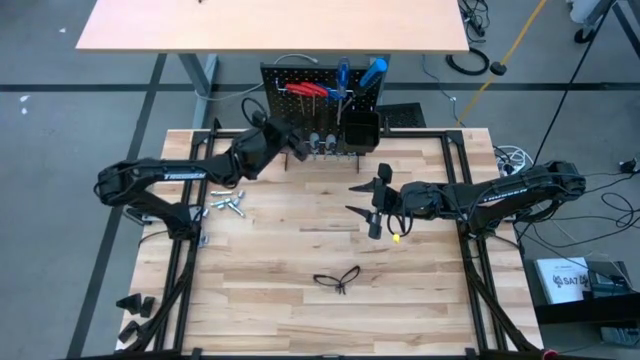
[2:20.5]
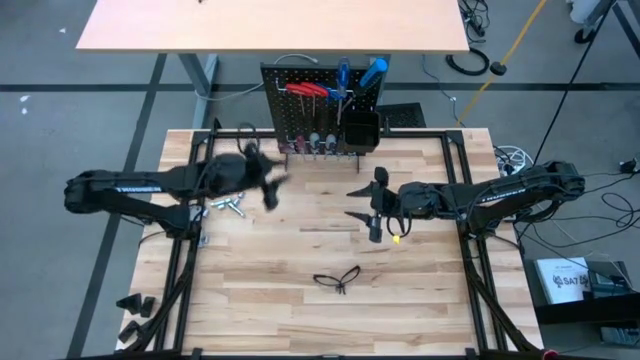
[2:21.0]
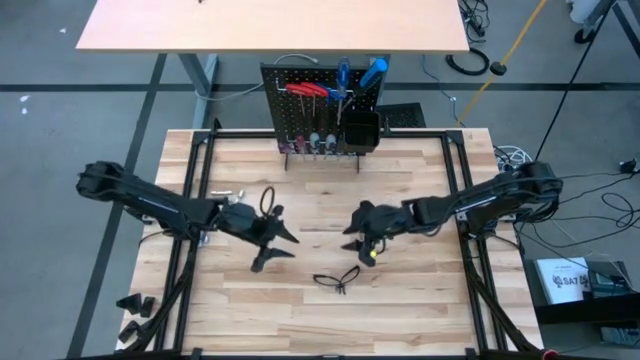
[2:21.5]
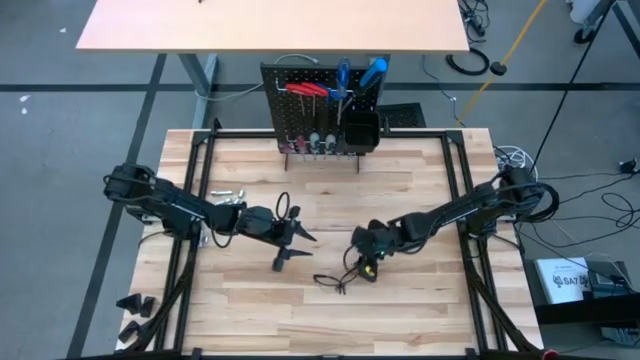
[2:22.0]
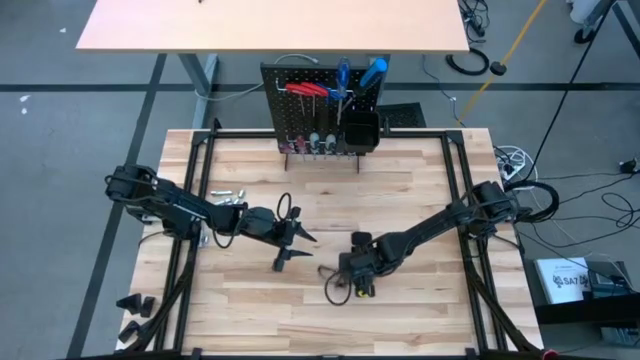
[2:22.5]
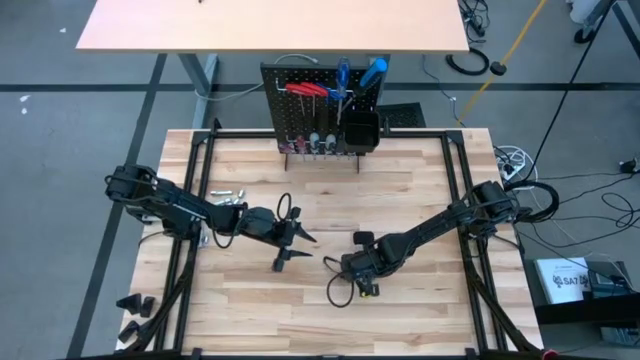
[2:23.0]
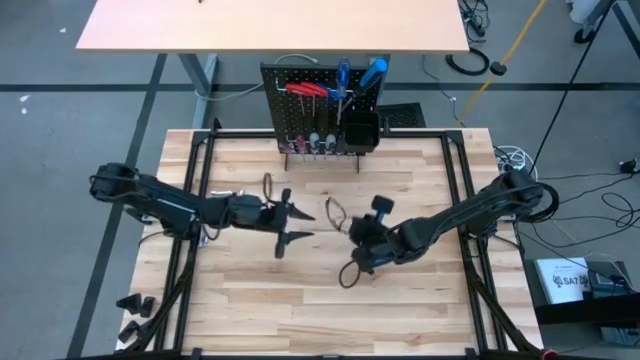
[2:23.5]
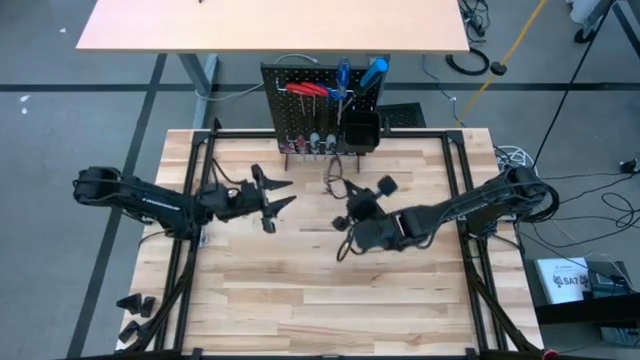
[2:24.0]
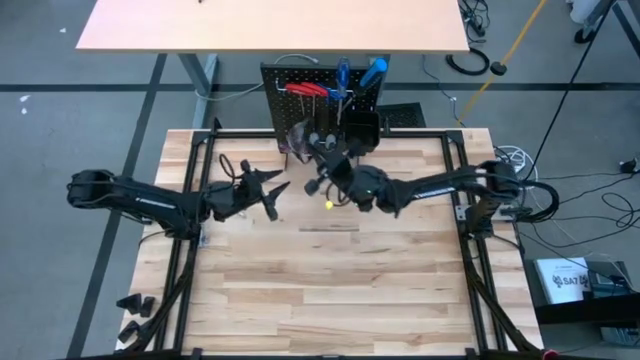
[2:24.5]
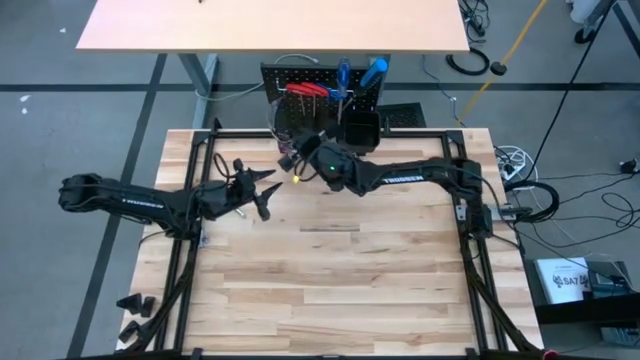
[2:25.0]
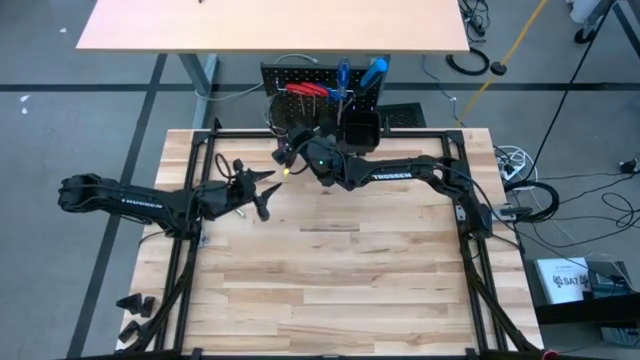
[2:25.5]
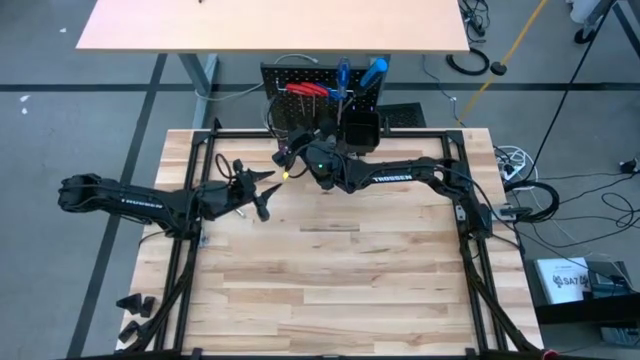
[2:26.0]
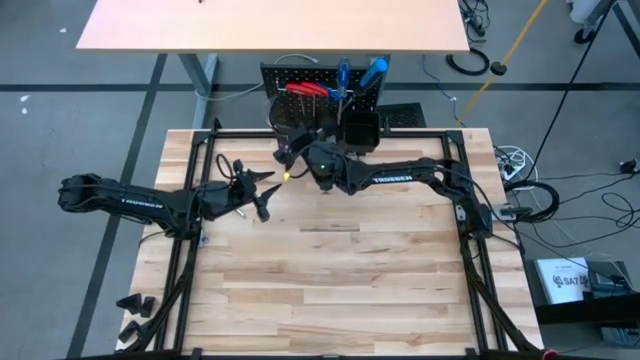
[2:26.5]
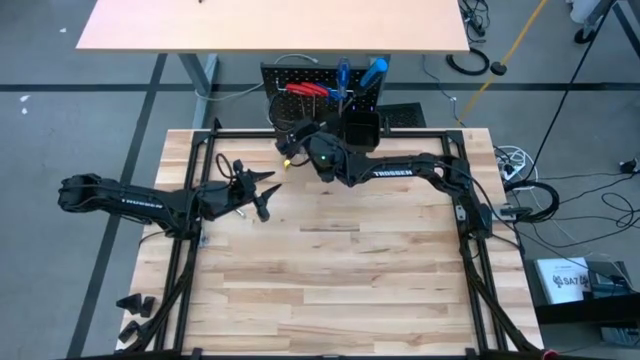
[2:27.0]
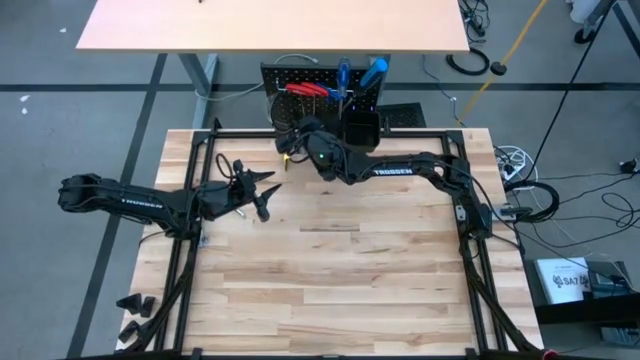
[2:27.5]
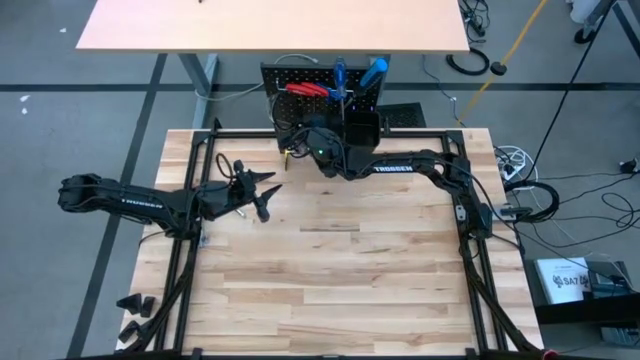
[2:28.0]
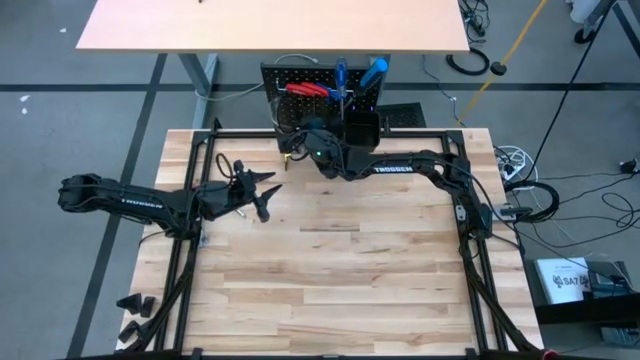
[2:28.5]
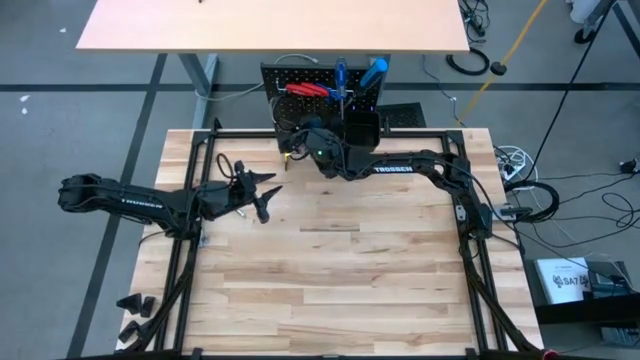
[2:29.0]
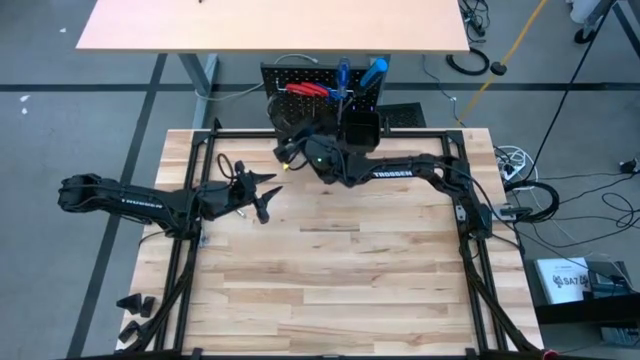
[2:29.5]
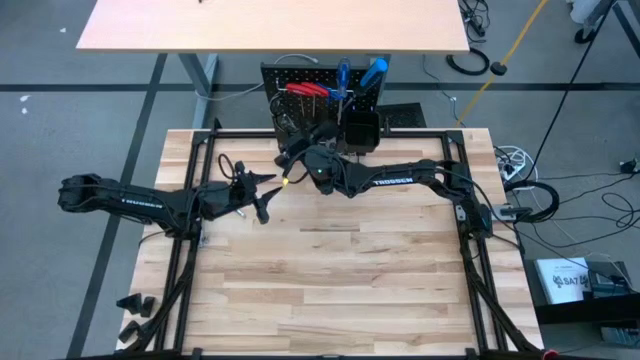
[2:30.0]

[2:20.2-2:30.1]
Task: Hang tools onto peg board
Hang the safety glasses onto the peg board

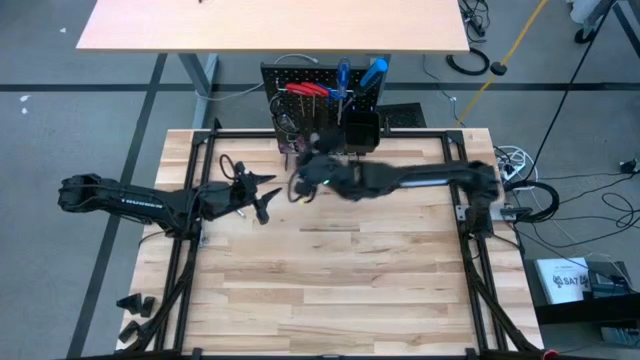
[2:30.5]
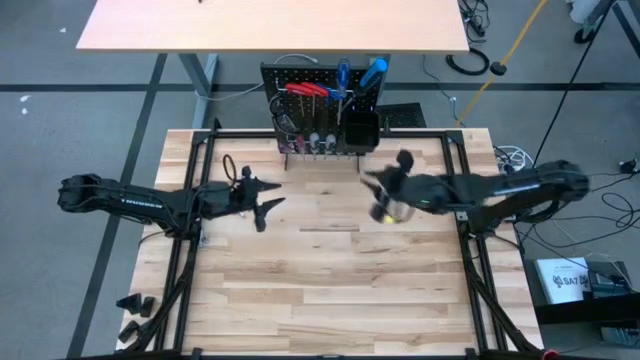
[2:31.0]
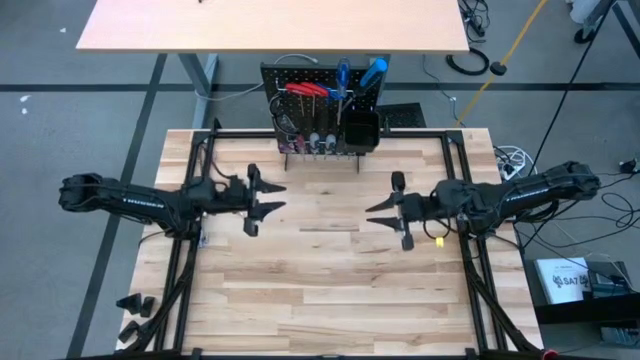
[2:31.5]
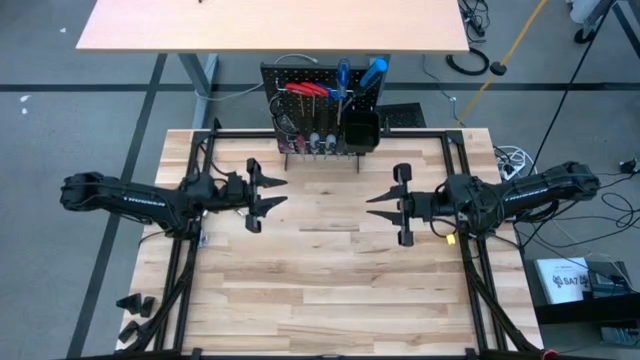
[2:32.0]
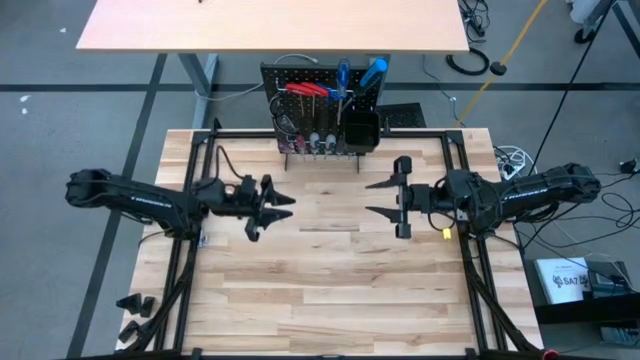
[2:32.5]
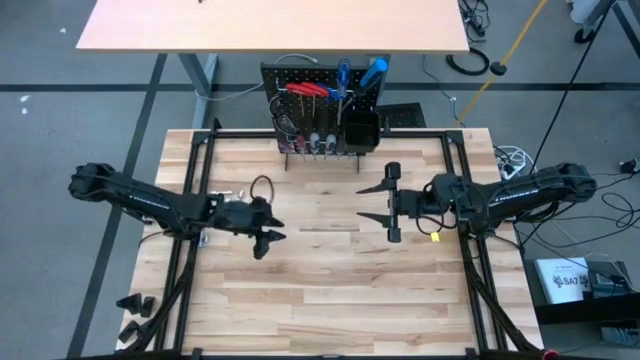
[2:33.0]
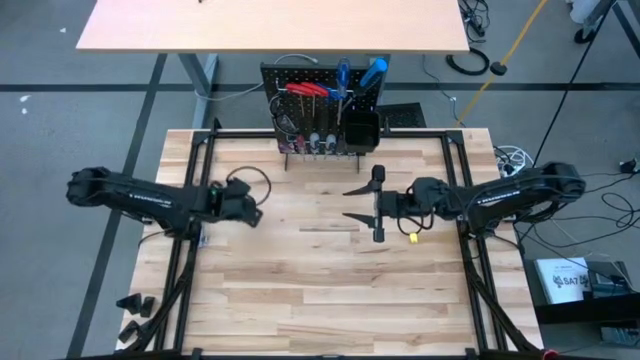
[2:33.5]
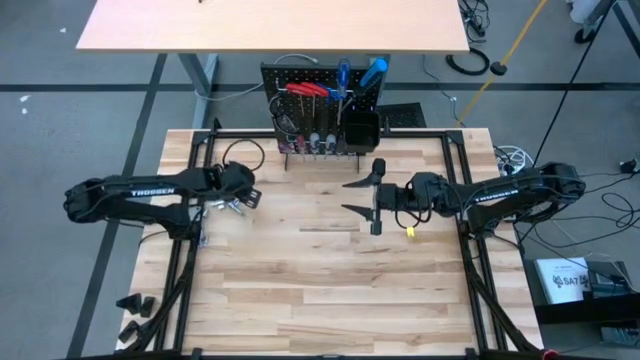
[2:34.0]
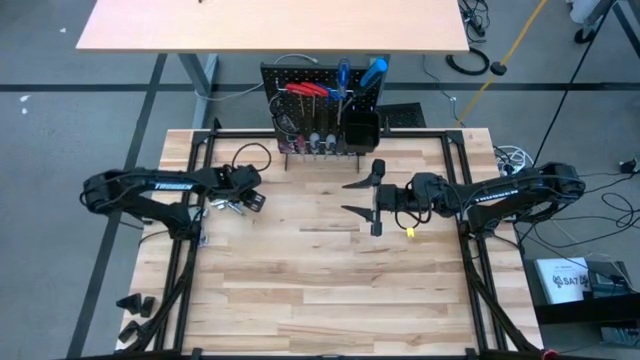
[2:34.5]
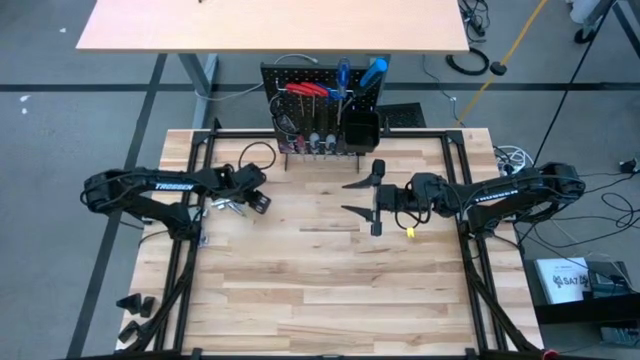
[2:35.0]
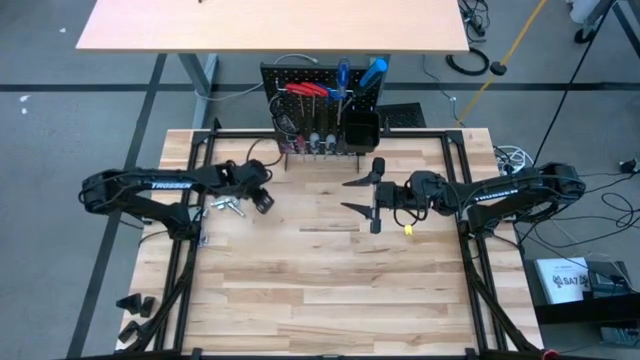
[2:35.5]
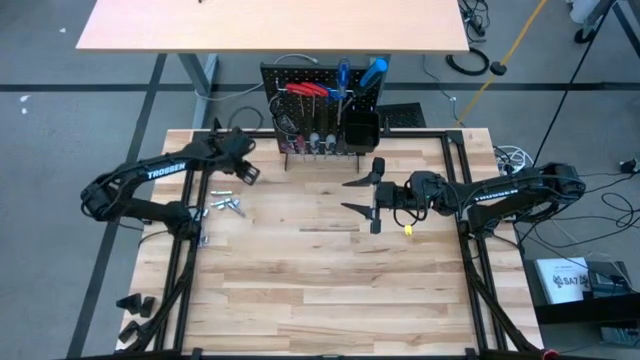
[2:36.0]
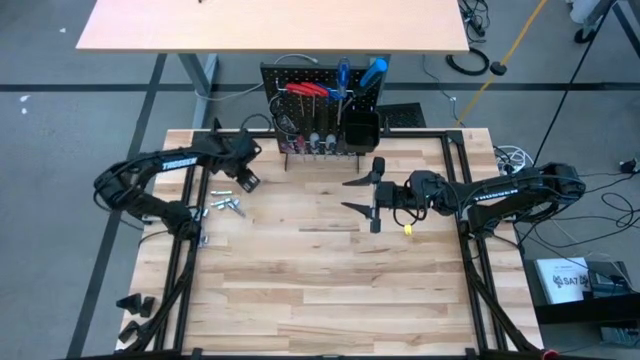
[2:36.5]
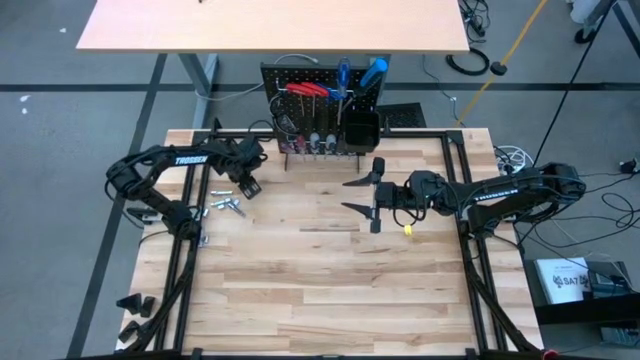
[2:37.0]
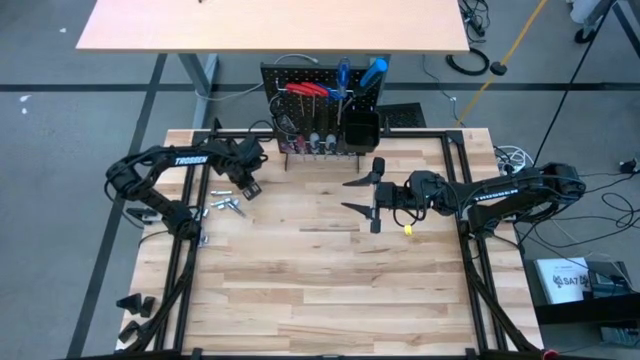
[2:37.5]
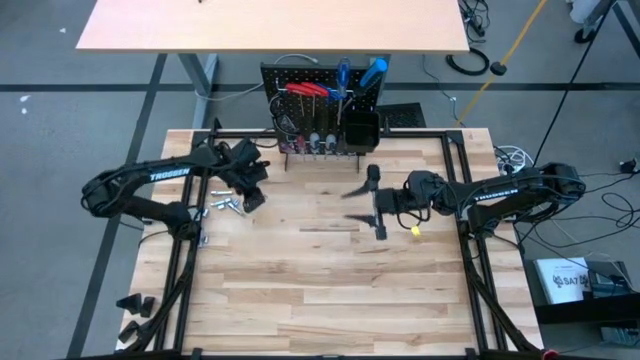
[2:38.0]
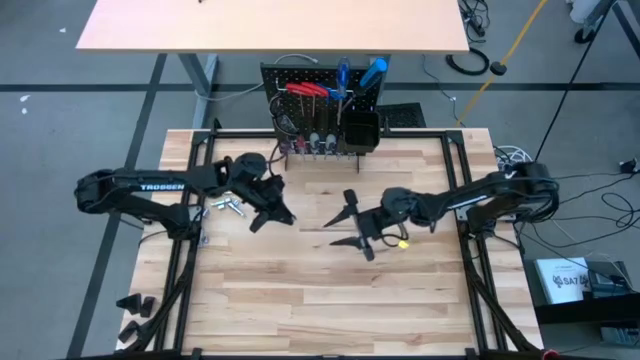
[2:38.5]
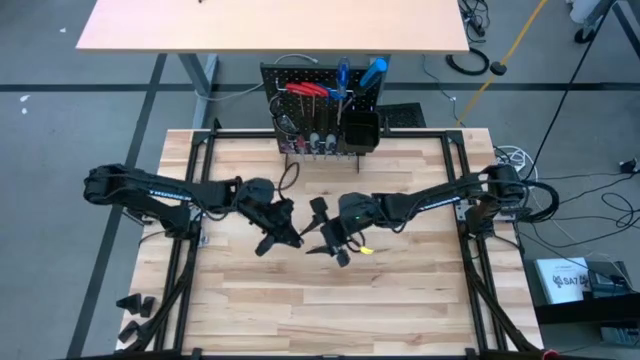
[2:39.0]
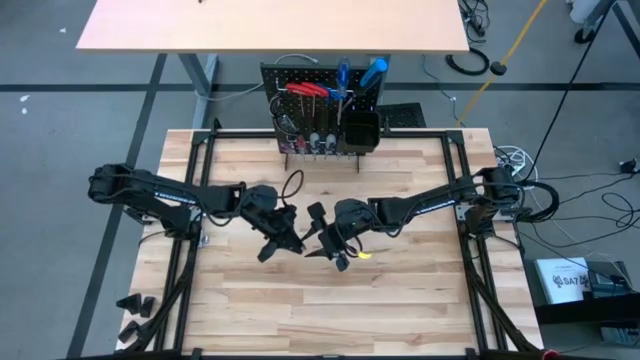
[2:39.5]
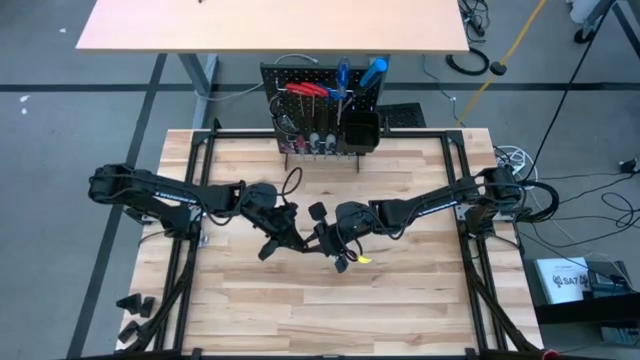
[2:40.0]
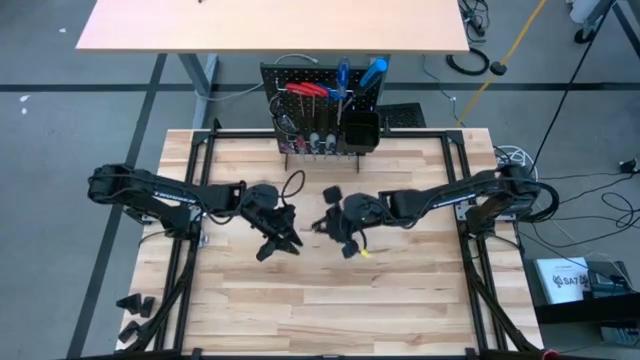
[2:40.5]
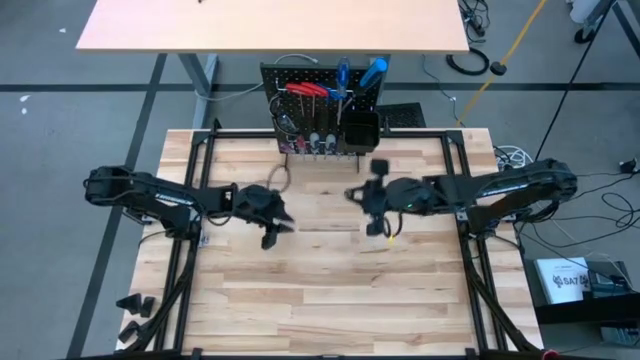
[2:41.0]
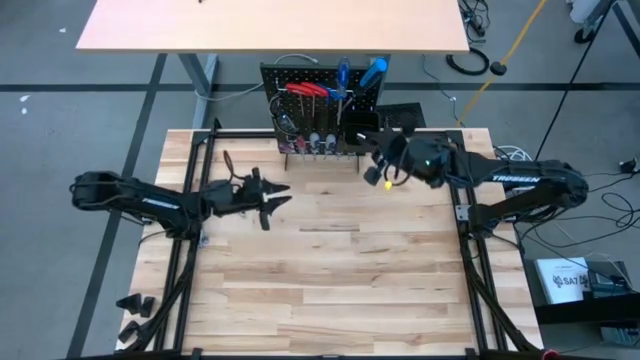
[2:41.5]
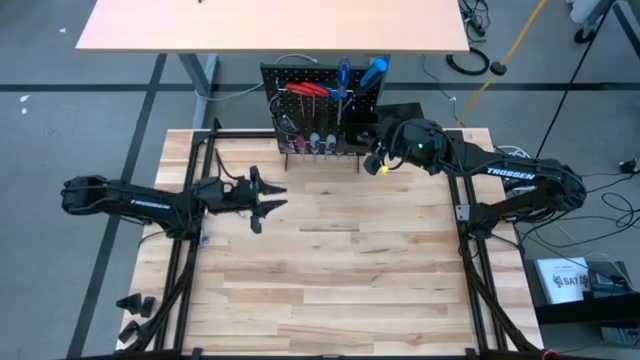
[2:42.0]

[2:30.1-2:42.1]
Put the socket wrench into the black bin on the peg board
